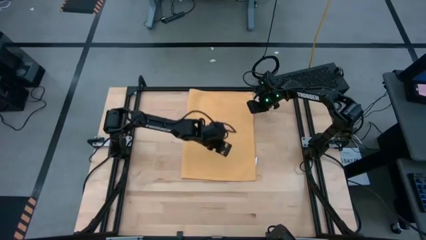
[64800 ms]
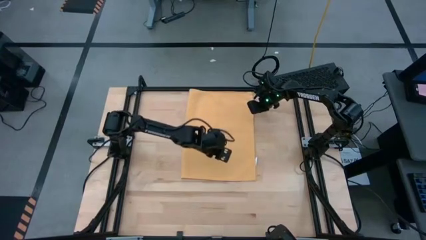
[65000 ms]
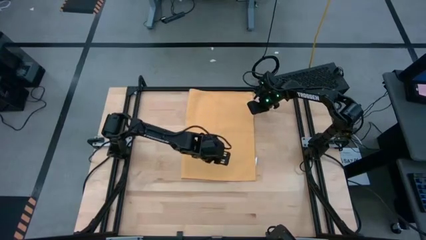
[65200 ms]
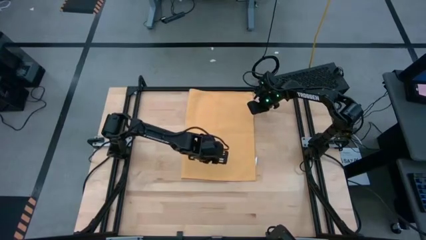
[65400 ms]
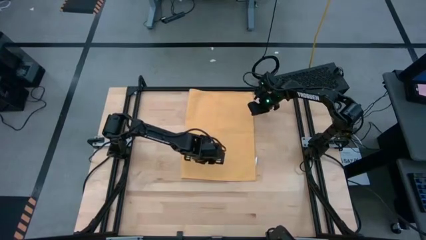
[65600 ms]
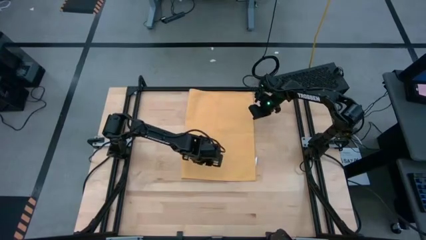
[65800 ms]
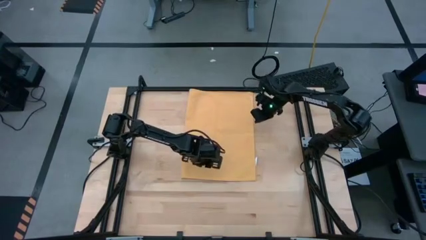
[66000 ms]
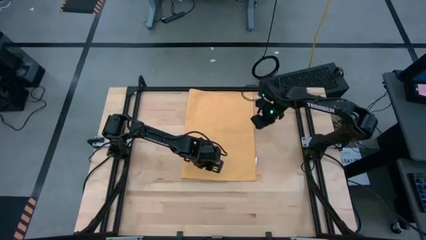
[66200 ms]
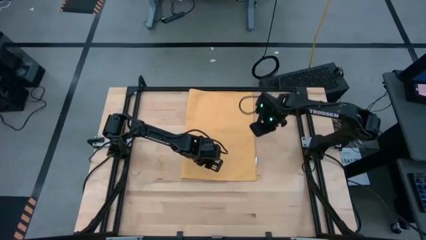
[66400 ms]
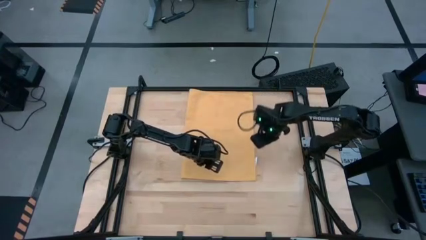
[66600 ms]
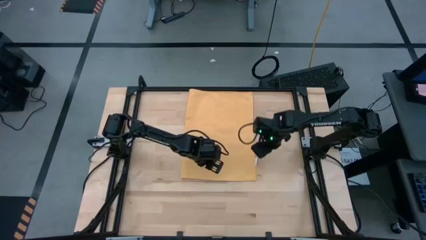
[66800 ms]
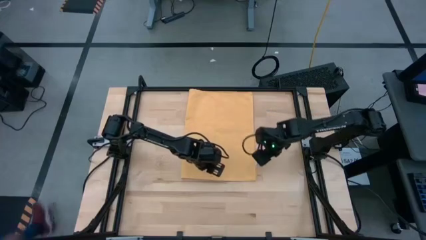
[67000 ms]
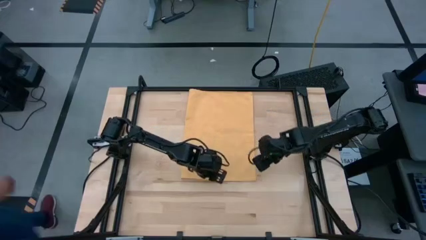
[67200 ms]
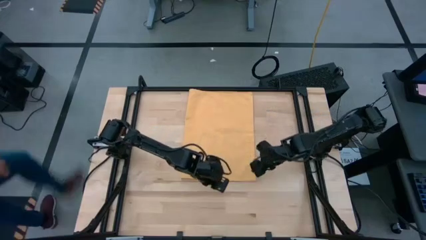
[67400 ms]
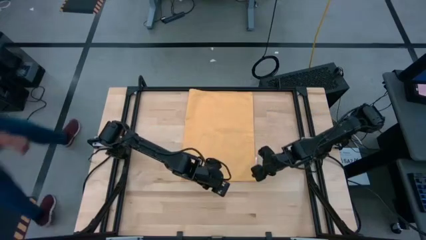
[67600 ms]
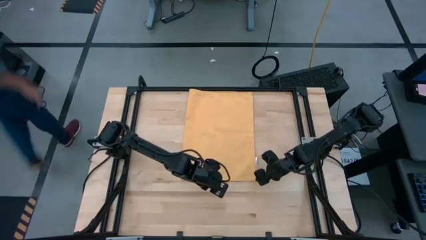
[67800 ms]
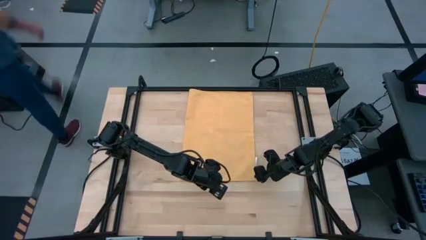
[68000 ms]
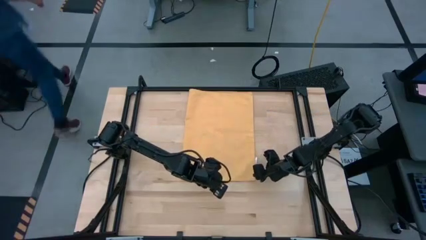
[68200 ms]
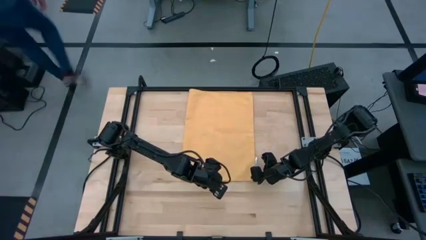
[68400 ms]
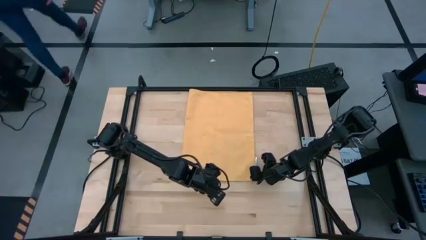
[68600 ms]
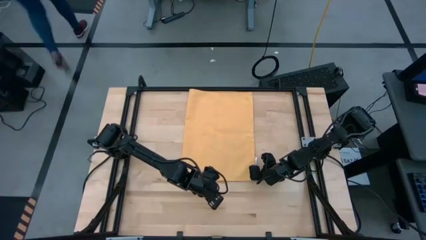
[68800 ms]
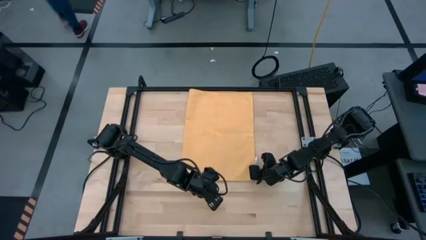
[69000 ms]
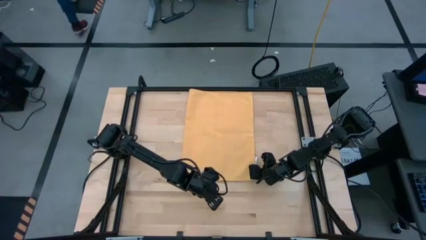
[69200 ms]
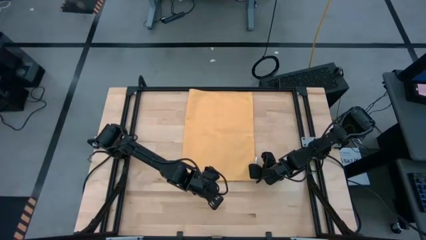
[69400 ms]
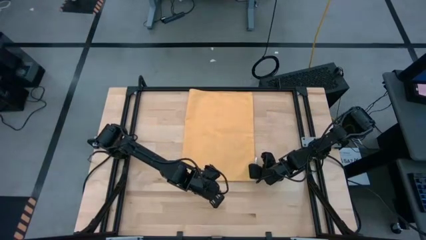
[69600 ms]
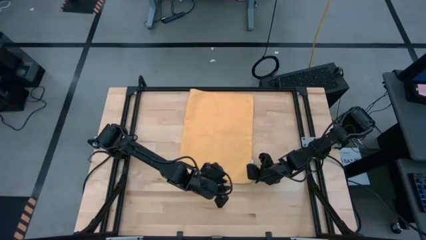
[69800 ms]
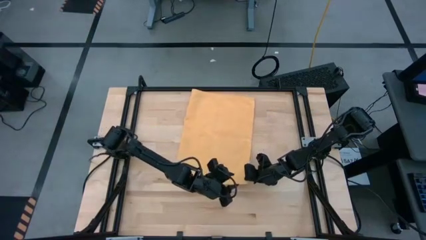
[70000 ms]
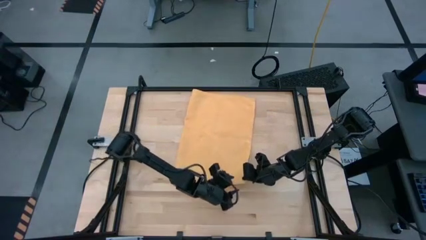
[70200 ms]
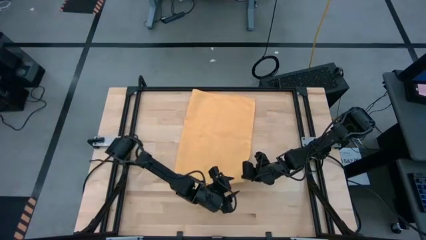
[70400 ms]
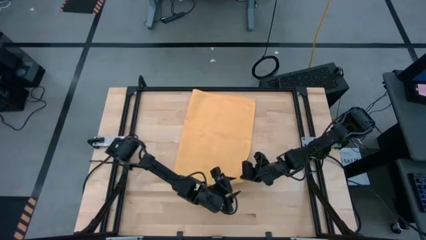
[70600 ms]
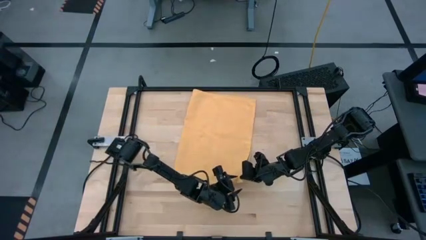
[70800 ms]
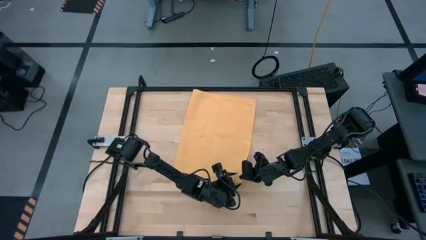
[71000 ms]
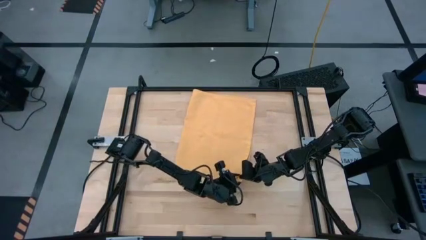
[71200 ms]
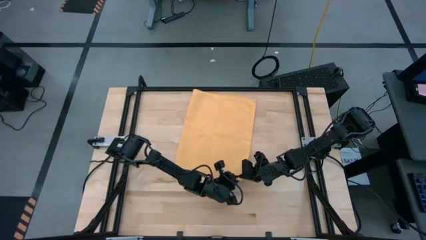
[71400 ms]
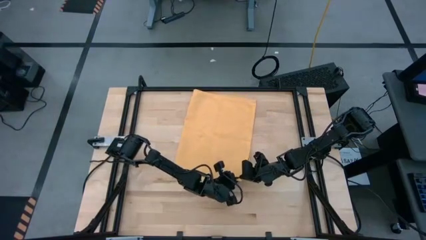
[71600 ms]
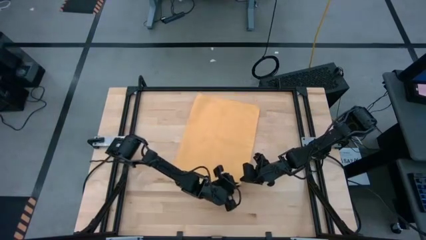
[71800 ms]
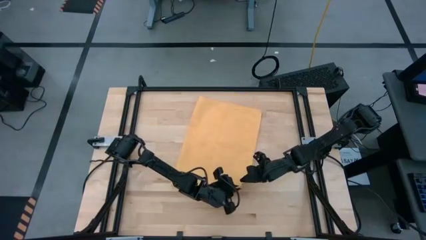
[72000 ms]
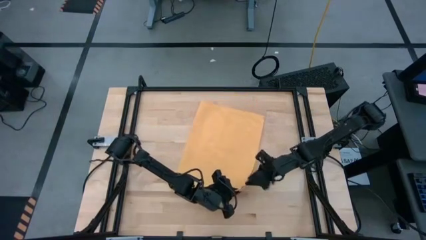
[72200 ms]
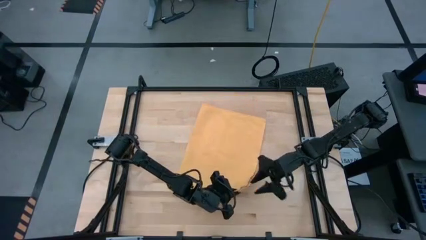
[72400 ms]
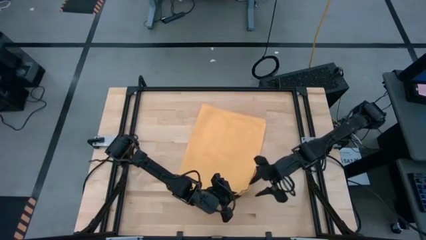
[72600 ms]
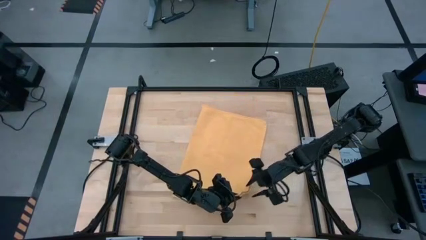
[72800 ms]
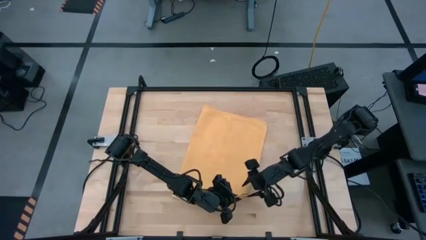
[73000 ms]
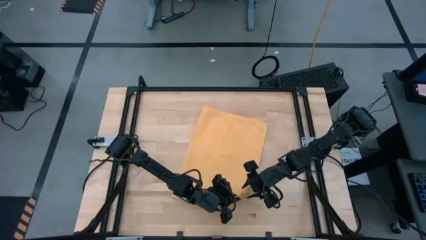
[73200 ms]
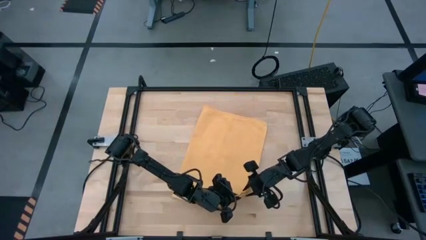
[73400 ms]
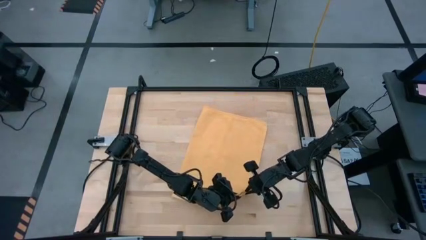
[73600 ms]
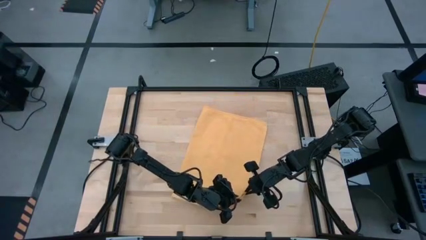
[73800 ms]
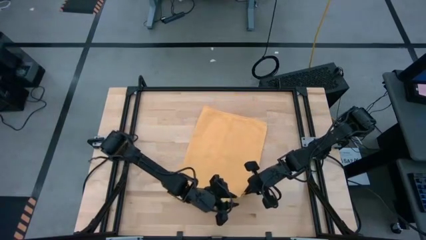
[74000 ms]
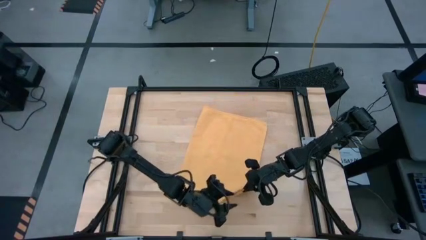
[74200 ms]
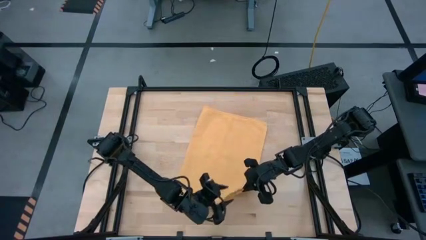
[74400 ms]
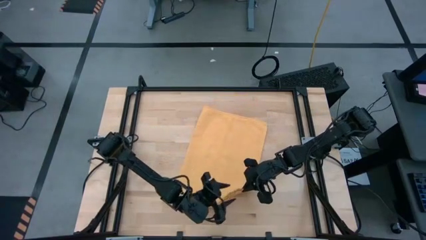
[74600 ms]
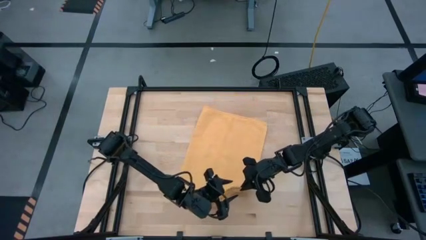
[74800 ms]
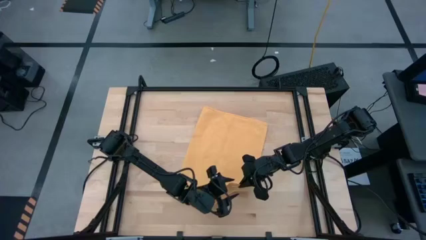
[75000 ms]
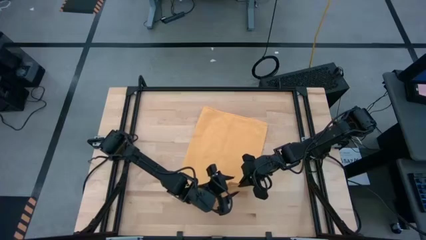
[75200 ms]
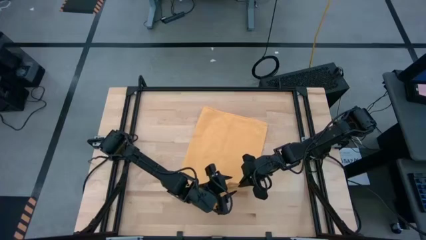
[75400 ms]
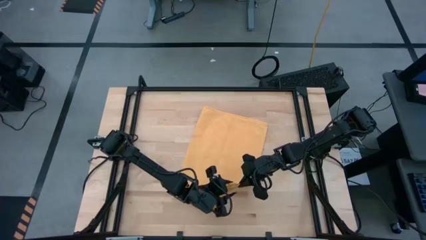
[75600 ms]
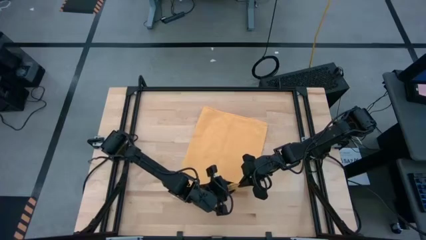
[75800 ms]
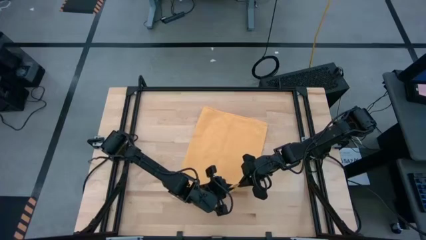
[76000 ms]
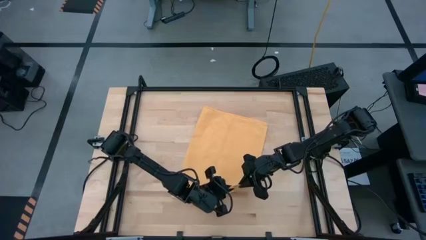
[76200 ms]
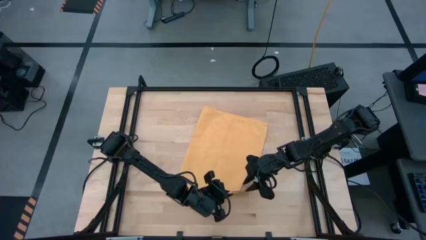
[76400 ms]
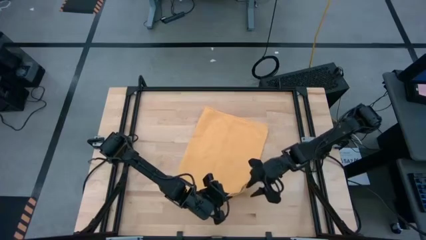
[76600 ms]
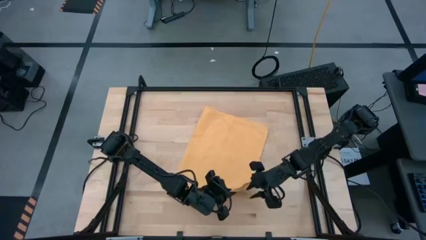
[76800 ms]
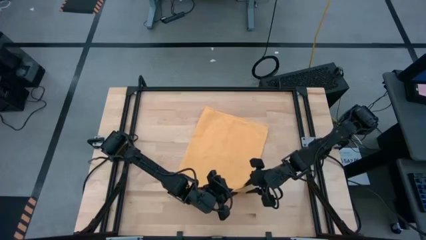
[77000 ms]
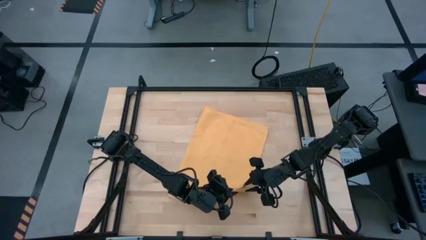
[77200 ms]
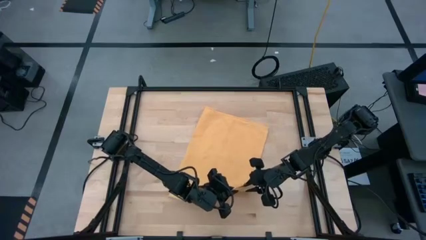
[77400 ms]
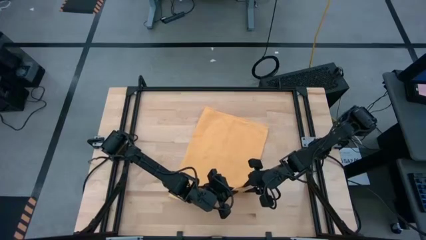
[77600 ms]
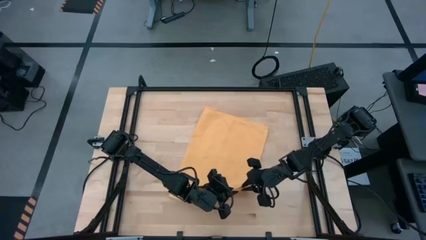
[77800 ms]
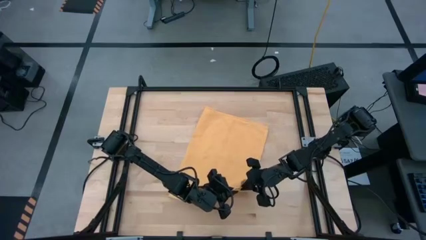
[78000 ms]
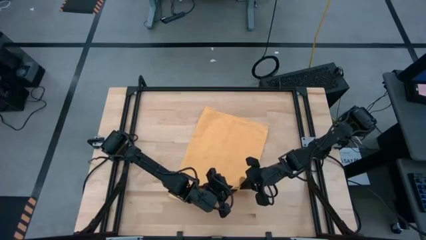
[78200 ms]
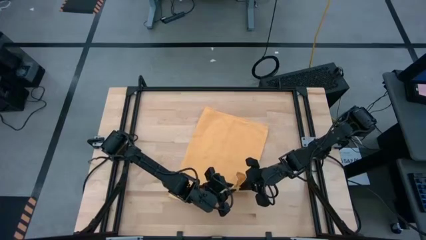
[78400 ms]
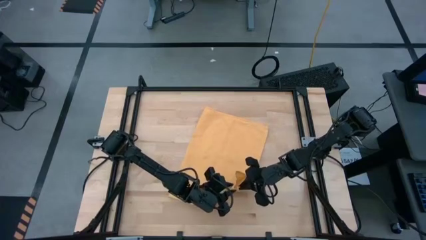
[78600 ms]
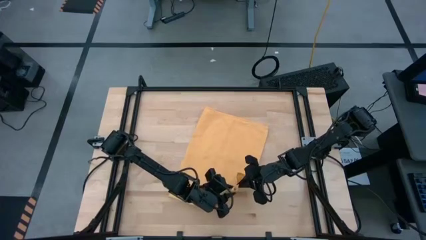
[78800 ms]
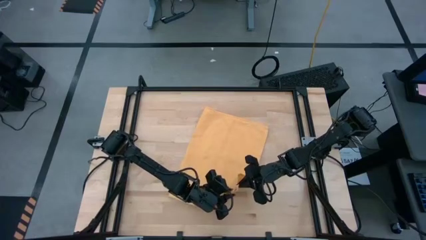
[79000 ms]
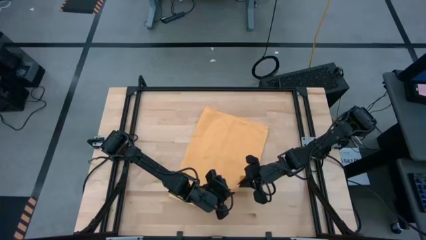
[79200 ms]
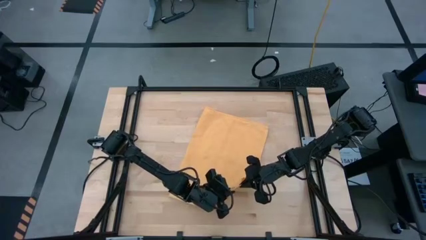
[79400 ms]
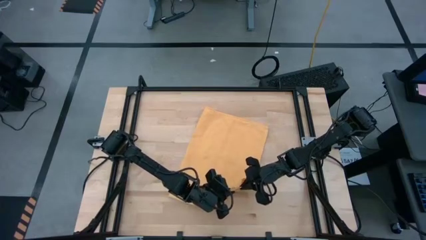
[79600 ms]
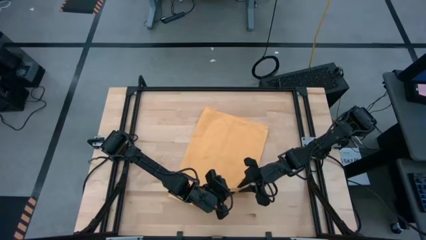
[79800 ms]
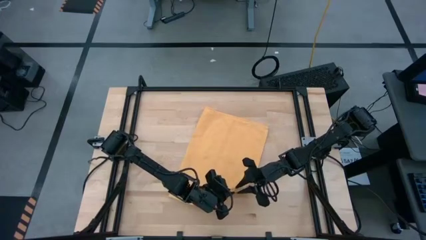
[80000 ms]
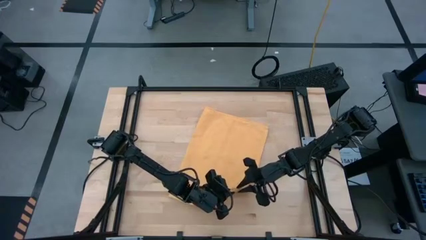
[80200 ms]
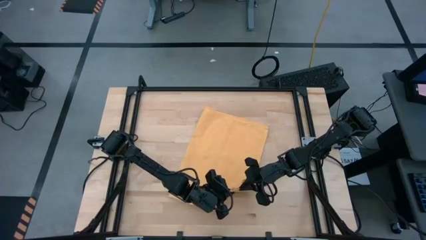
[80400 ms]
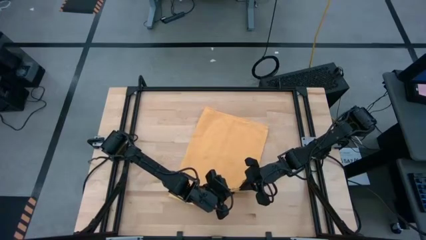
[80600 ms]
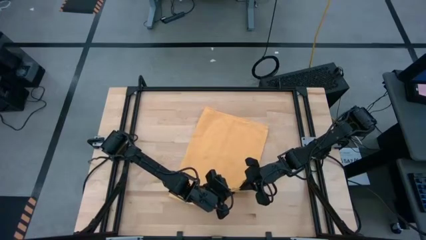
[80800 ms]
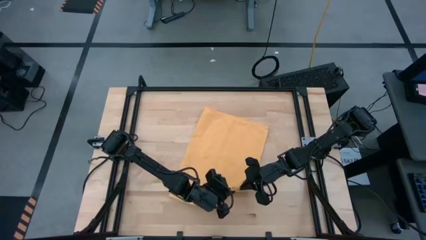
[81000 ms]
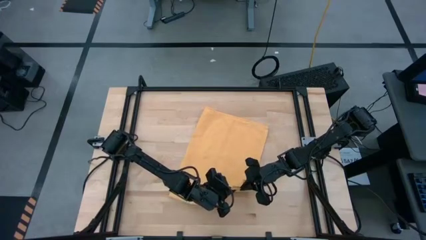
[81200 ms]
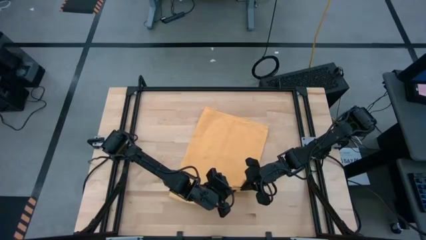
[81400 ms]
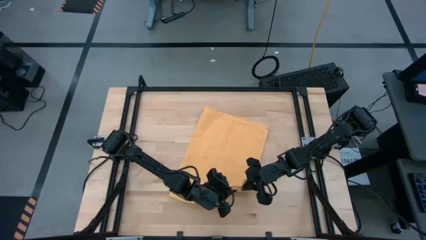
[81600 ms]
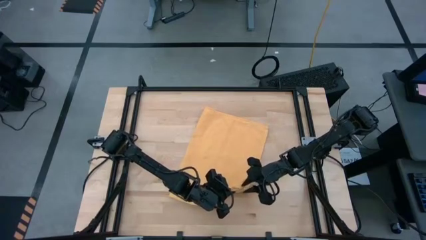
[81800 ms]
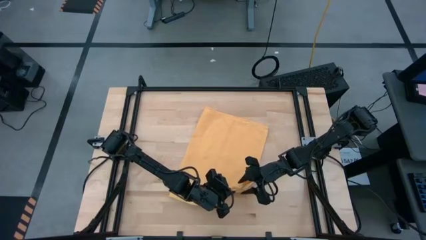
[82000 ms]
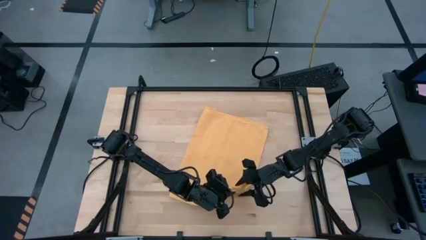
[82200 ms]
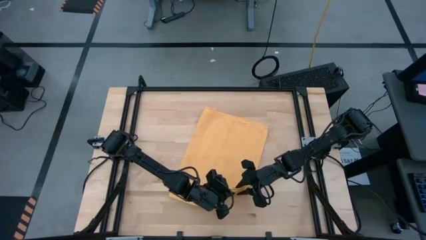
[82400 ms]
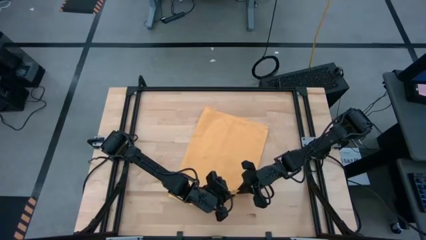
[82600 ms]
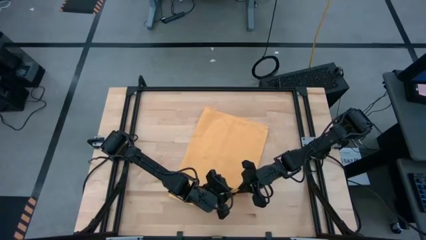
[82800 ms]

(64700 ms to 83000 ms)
Task: Roll towel
Roll the yellow towel
